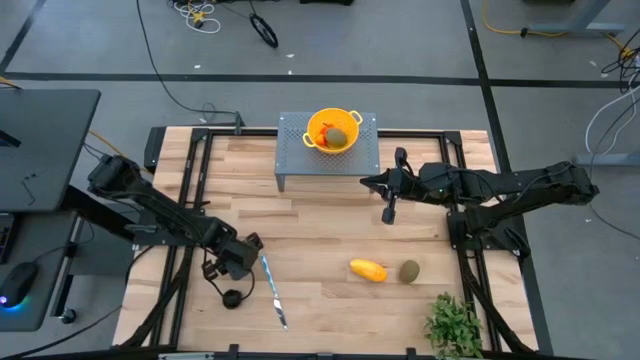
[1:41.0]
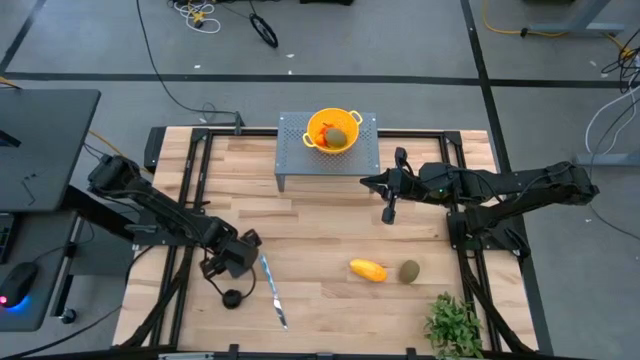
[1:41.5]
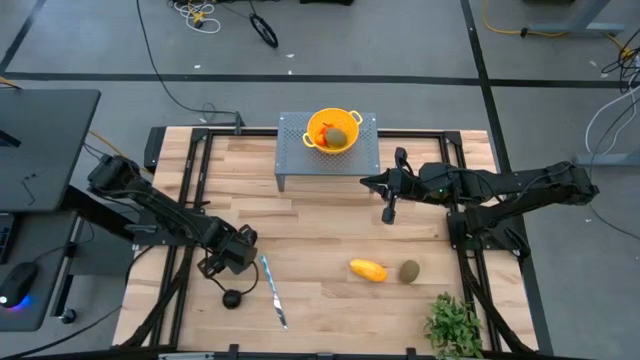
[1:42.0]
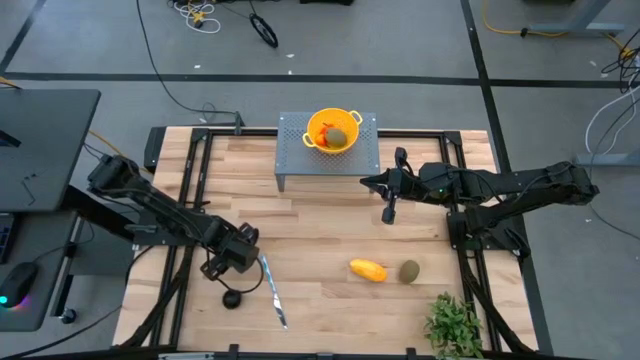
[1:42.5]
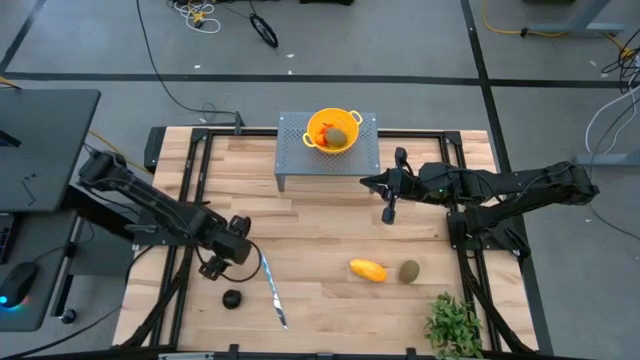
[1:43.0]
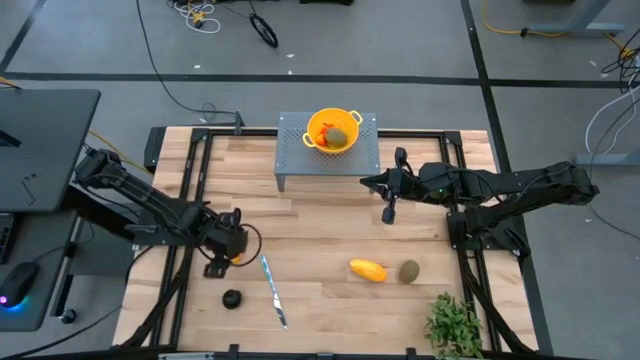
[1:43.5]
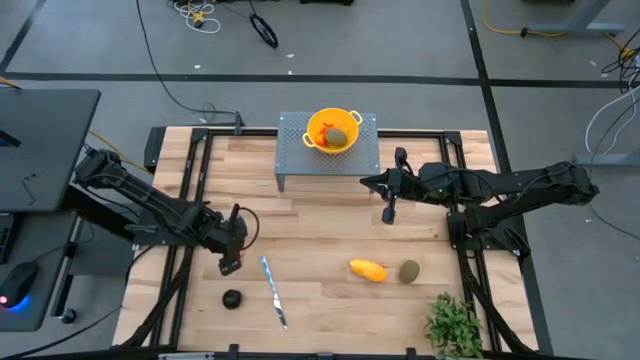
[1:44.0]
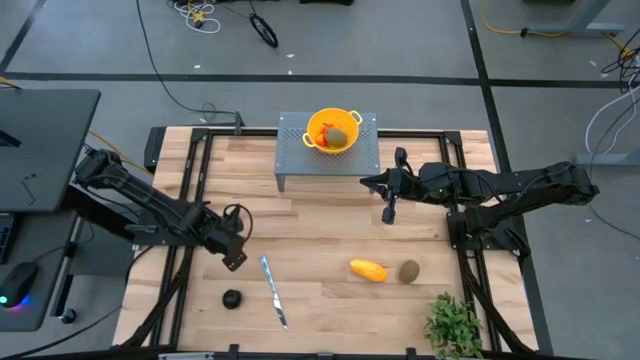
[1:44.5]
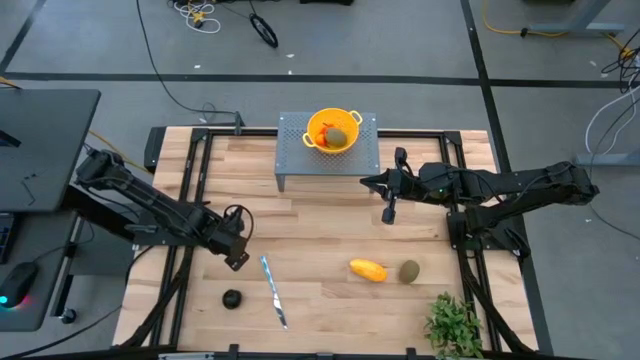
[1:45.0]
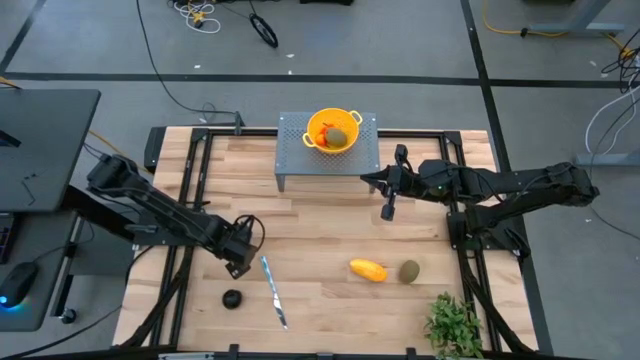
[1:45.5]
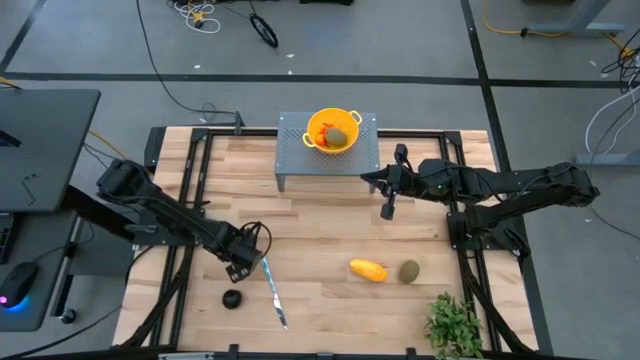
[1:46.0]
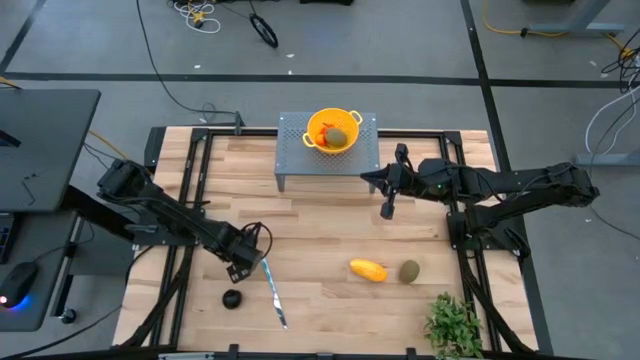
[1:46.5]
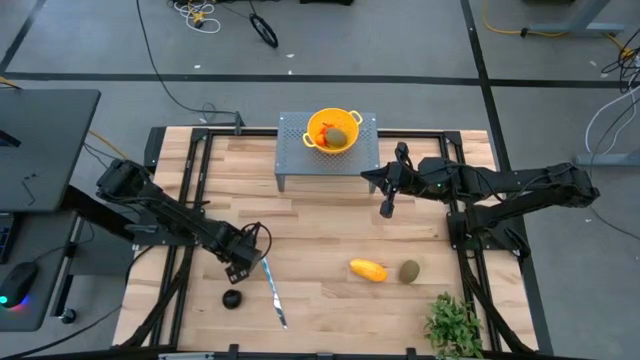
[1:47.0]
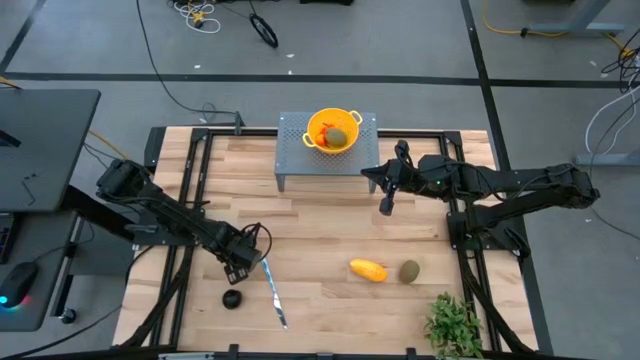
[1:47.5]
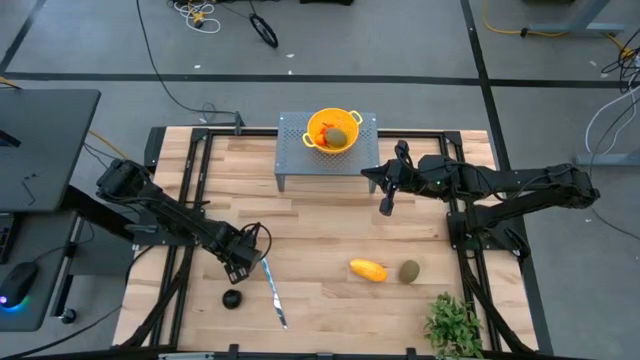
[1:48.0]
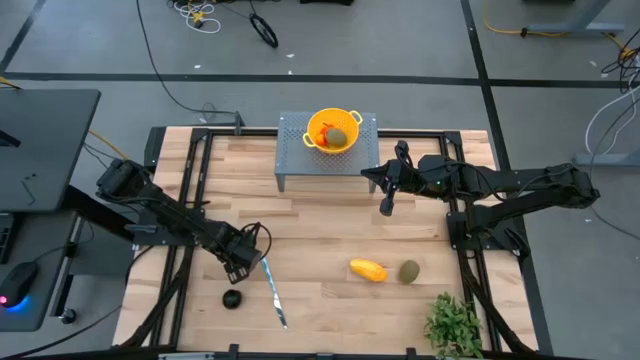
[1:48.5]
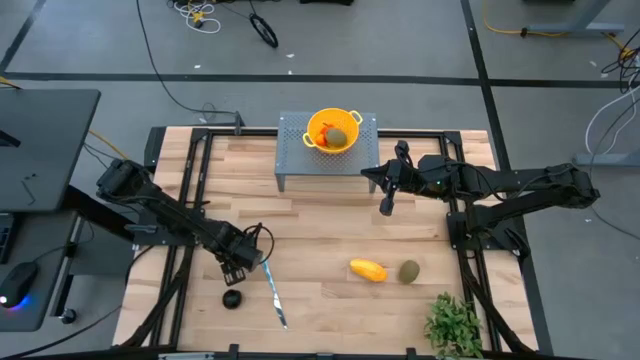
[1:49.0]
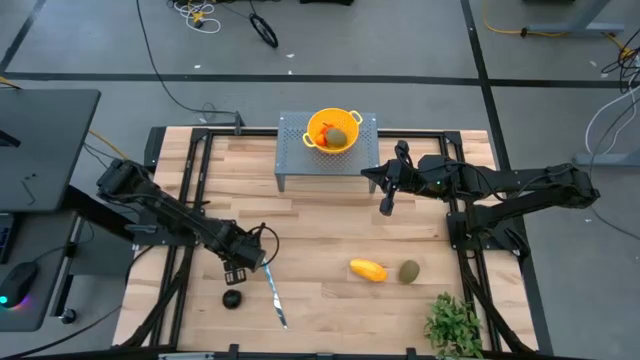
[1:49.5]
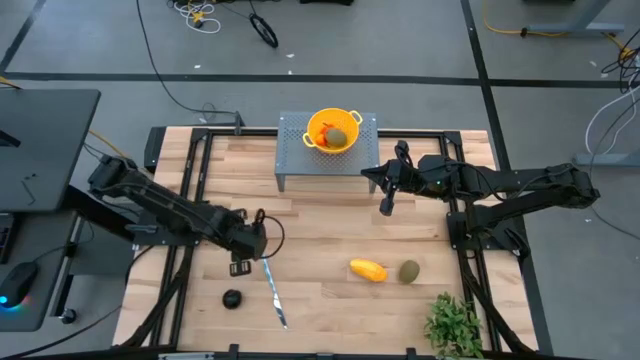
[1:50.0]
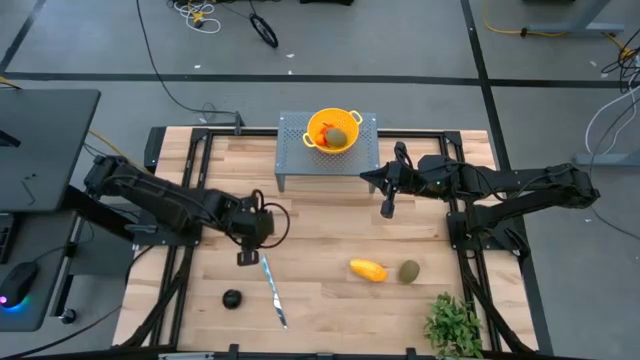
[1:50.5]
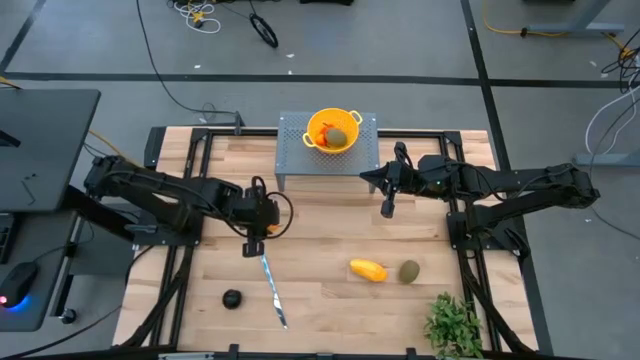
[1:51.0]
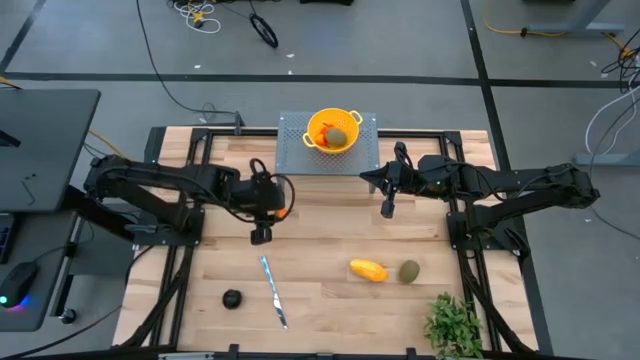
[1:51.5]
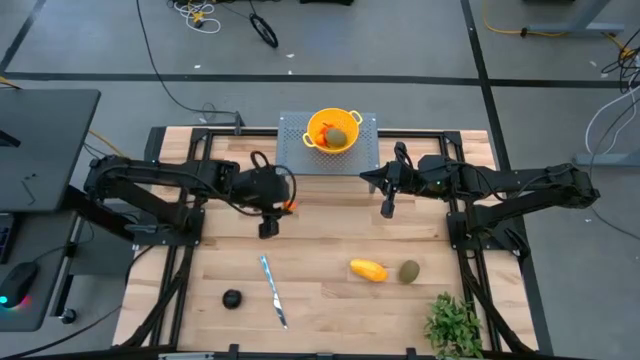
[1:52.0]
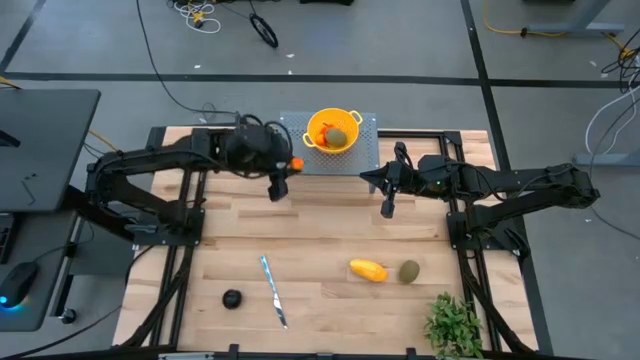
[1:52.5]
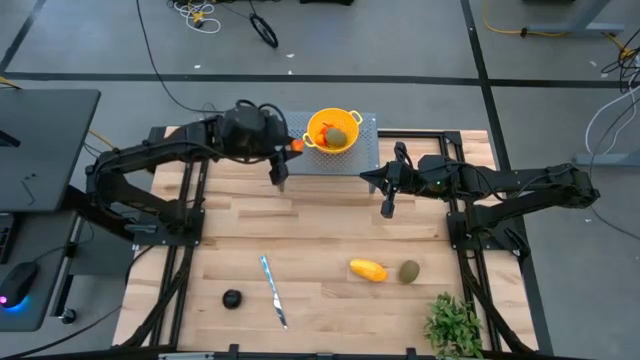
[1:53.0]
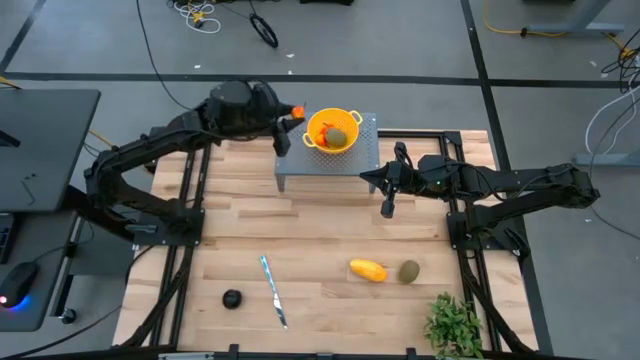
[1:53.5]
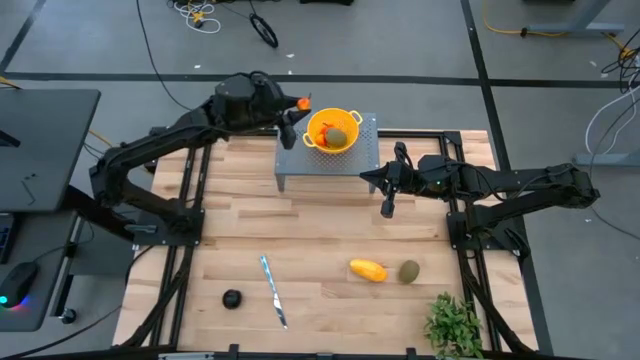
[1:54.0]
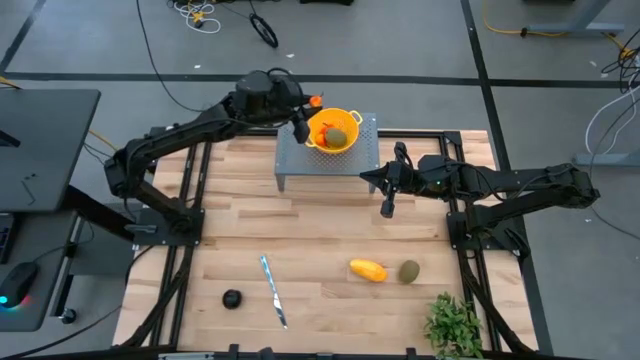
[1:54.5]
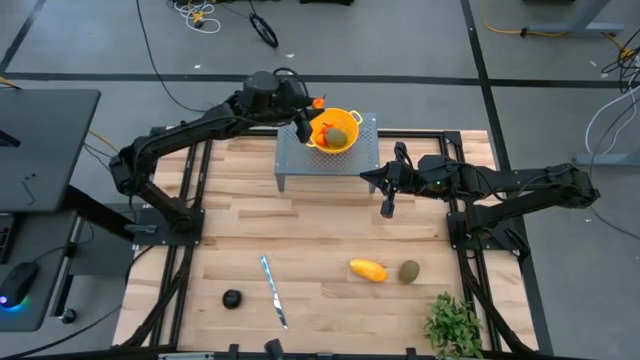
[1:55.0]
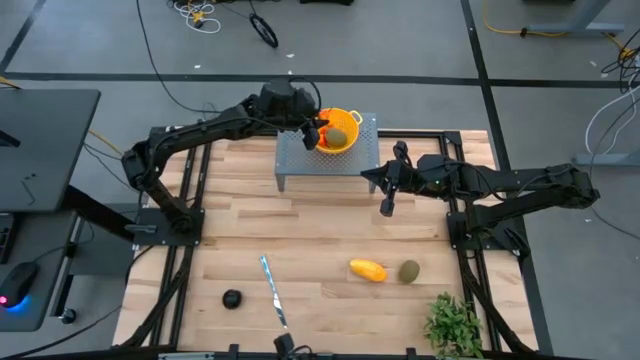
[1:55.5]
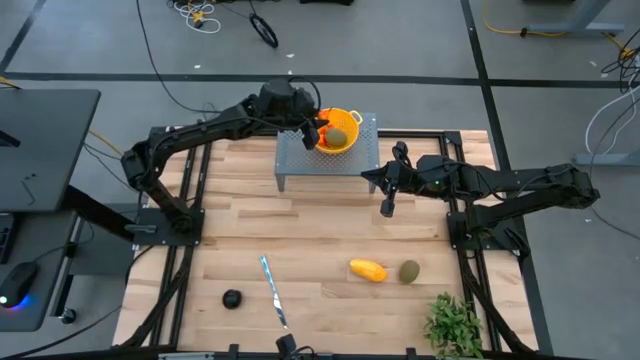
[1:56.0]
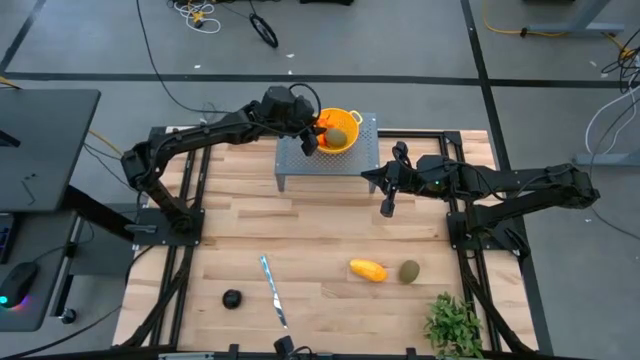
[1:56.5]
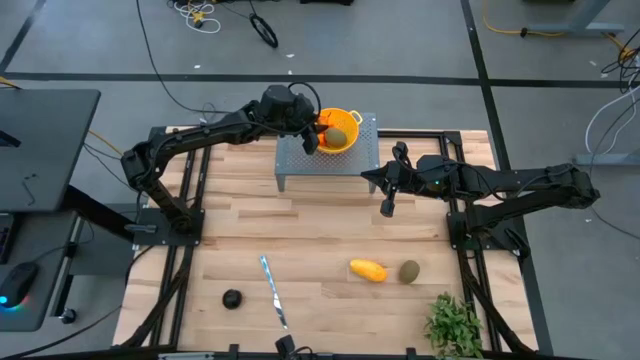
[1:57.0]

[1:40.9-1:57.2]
Task: Pick & Place Fruit
Put the pear into the yellow colander bowl on the shelf

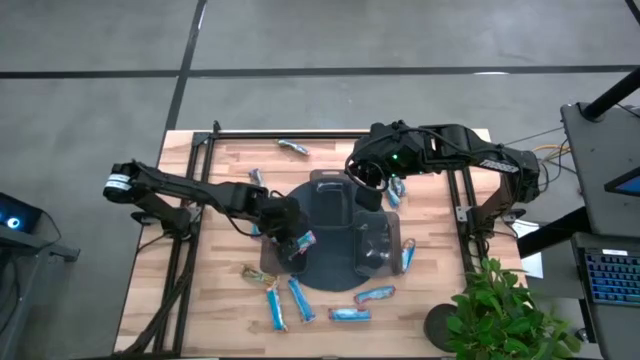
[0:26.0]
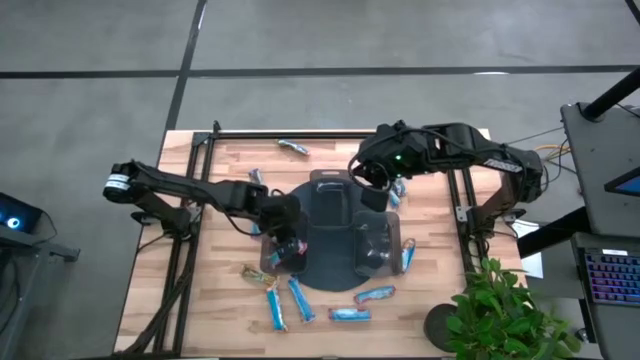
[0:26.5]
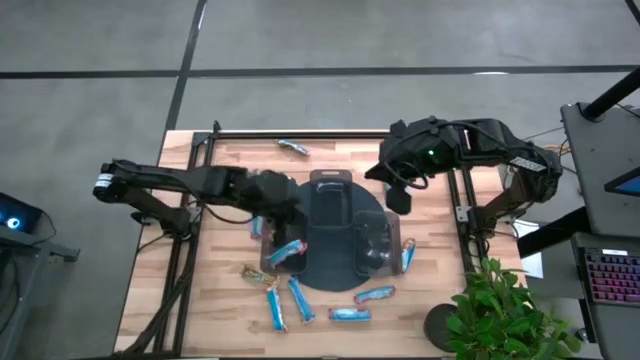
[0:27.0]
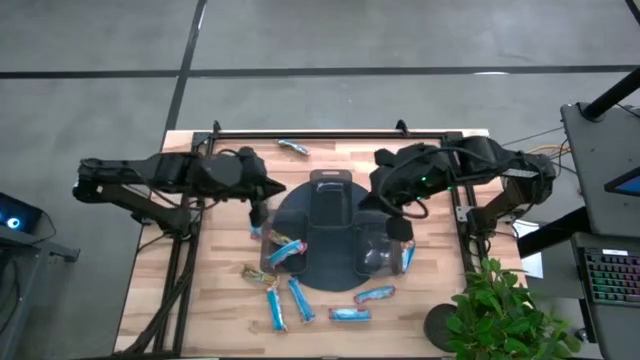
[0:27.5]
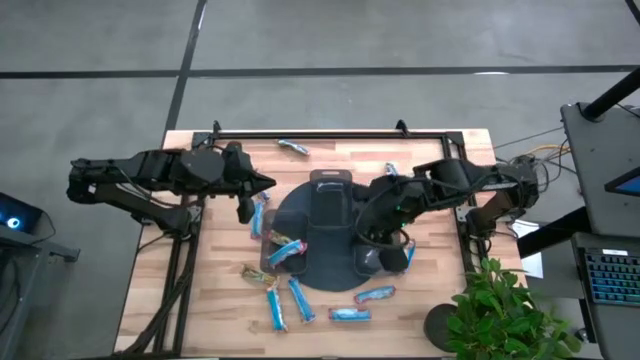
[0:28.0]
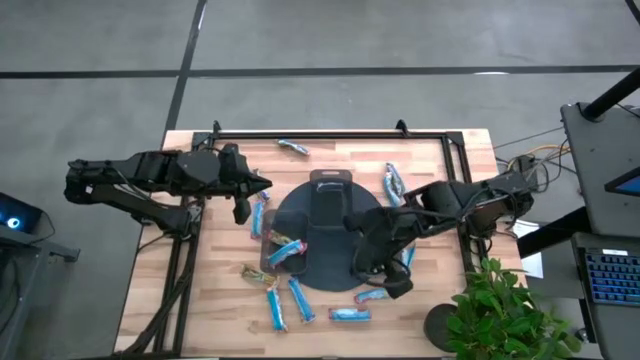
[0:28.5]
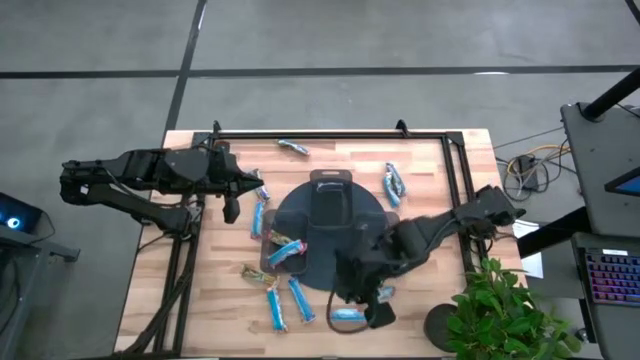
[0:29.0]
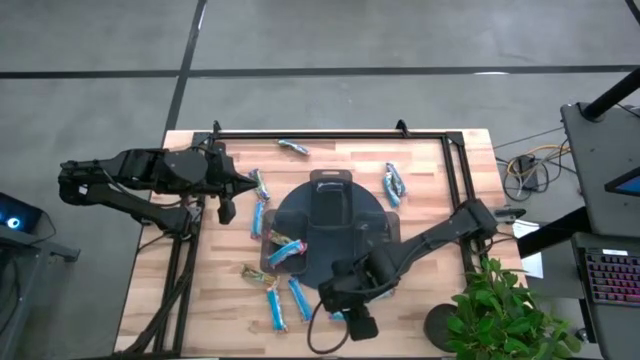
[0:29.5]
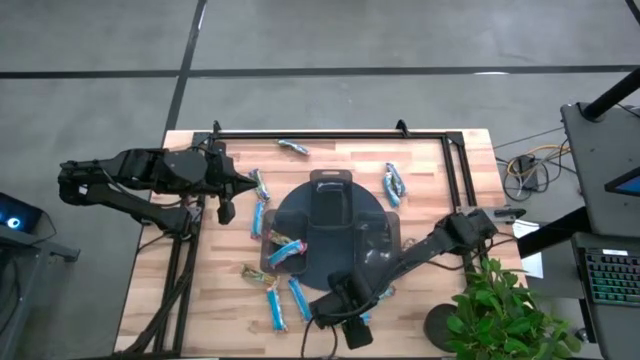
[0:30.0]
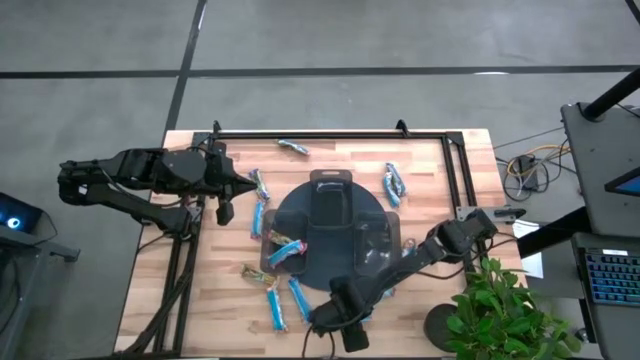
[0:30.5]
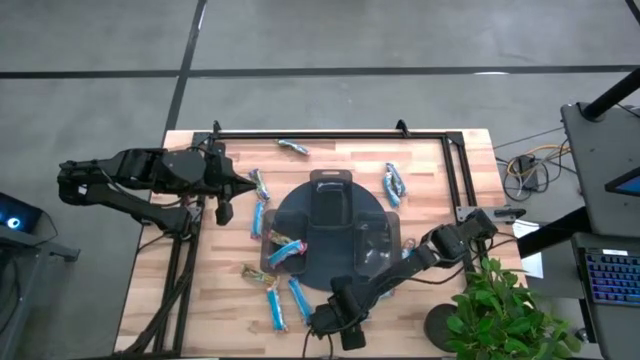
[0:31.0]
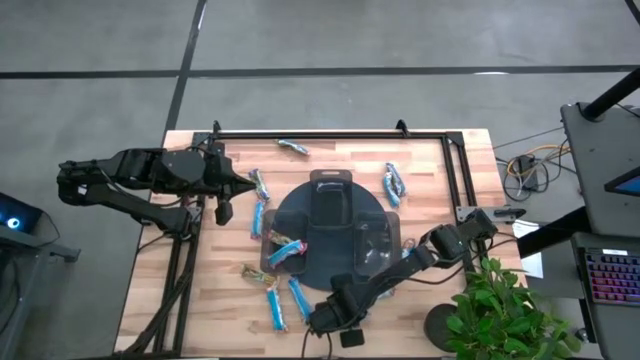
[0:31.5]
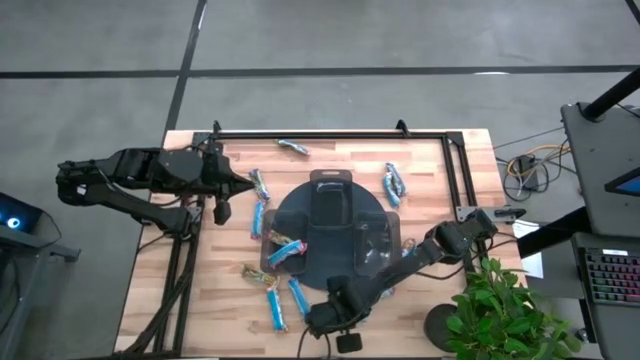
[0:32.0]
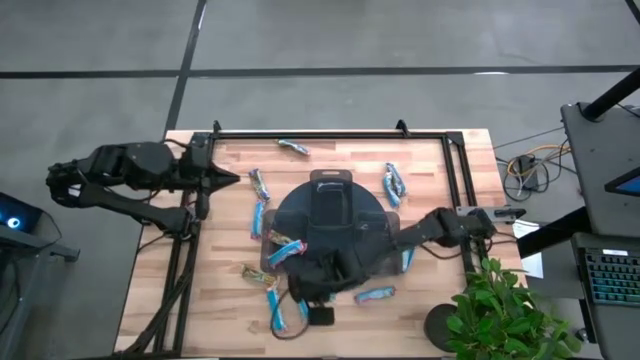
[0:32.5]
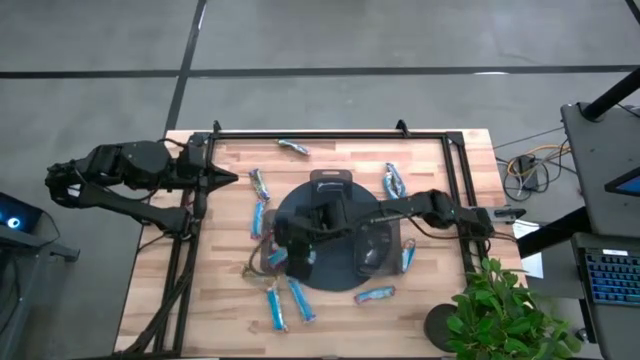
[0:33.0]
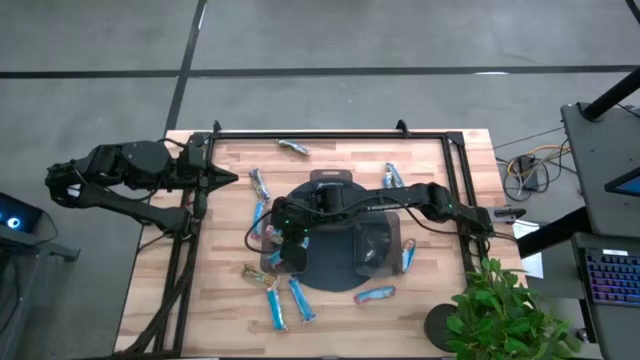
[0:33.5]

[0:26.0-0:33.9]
Task: Pick and place Granola Bars by type
Put the red granola bar into the bottom left black bin
